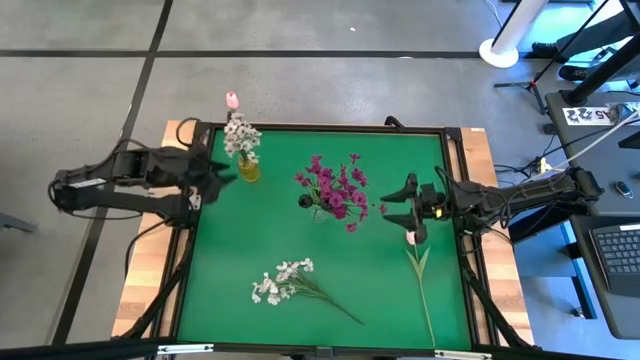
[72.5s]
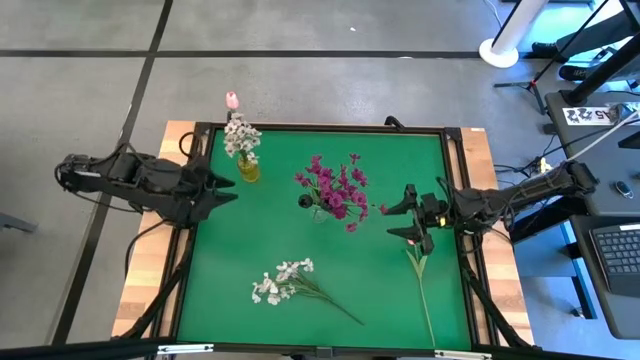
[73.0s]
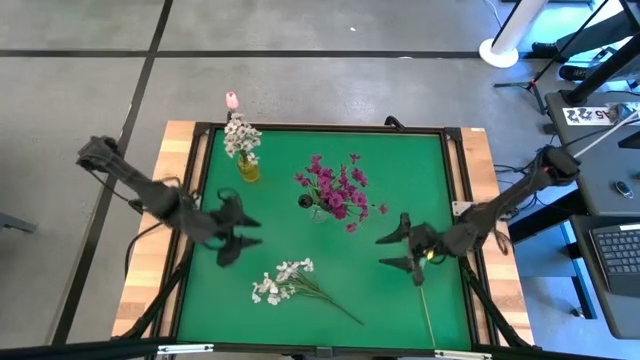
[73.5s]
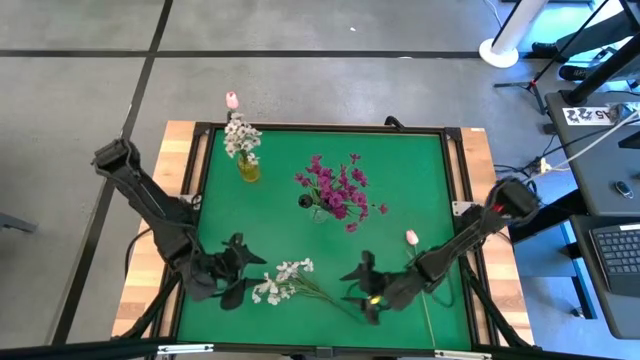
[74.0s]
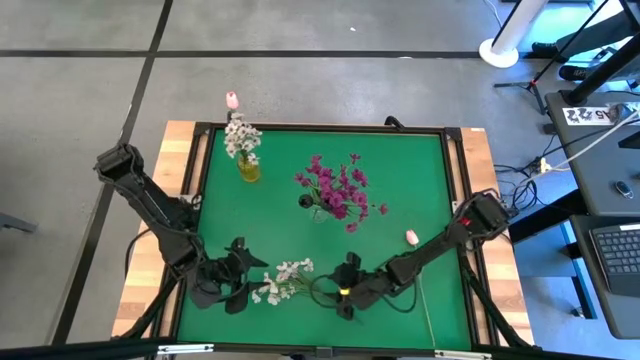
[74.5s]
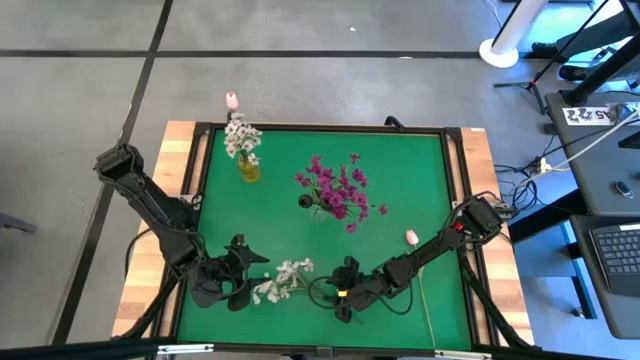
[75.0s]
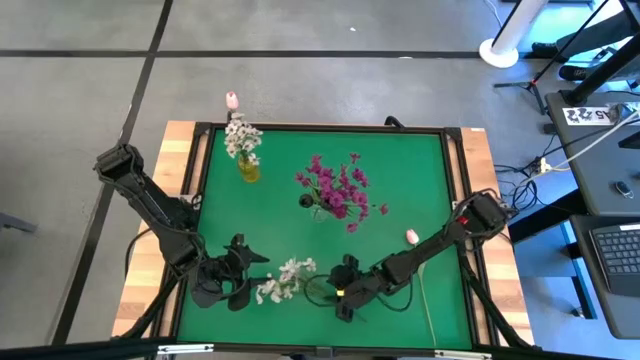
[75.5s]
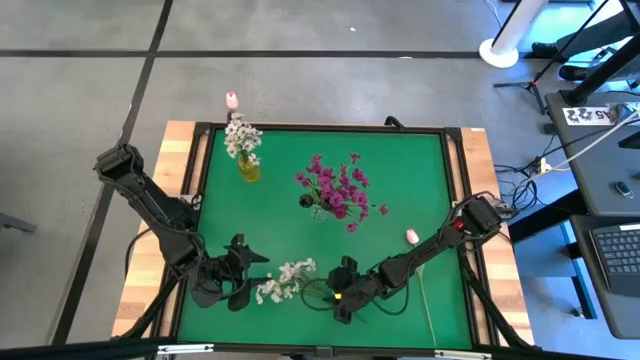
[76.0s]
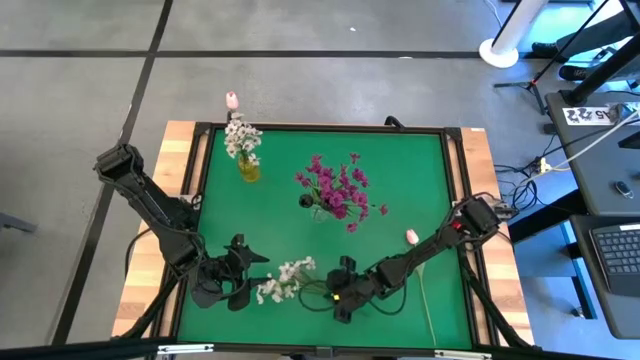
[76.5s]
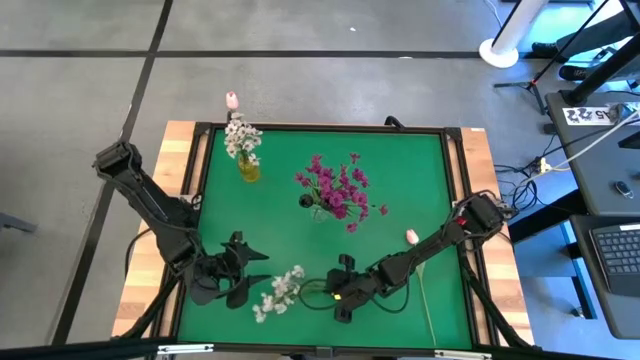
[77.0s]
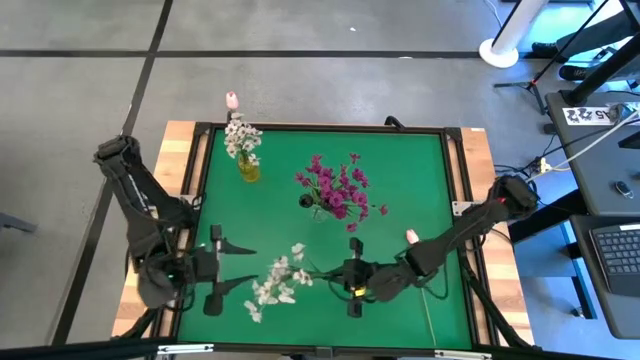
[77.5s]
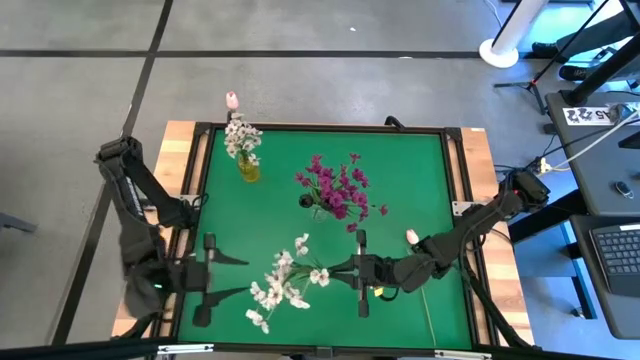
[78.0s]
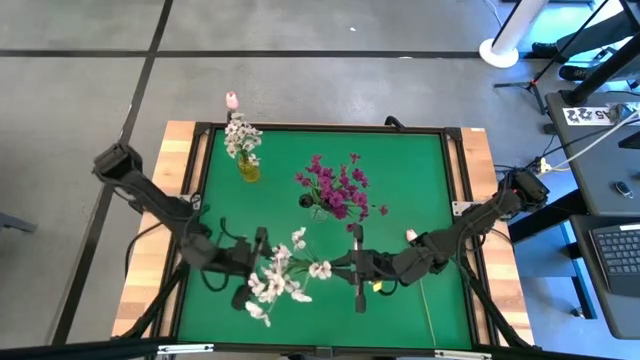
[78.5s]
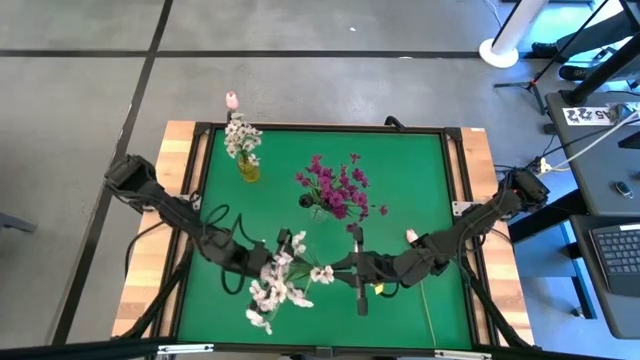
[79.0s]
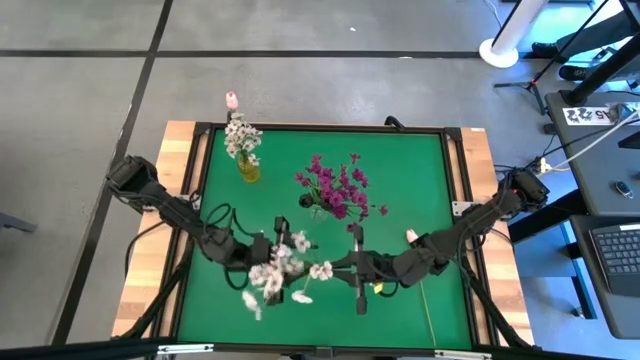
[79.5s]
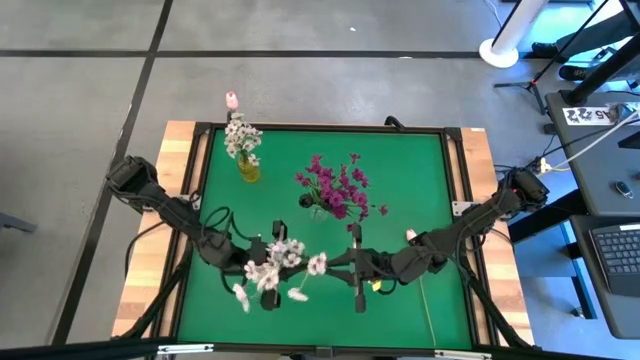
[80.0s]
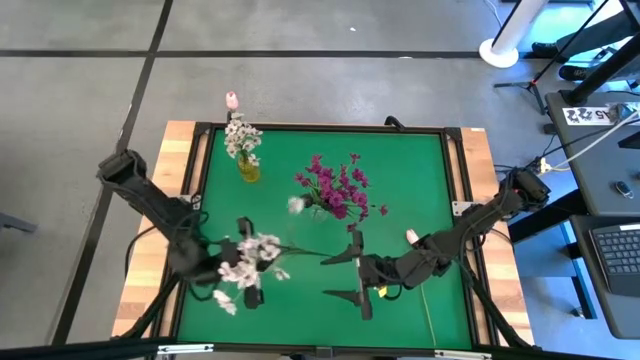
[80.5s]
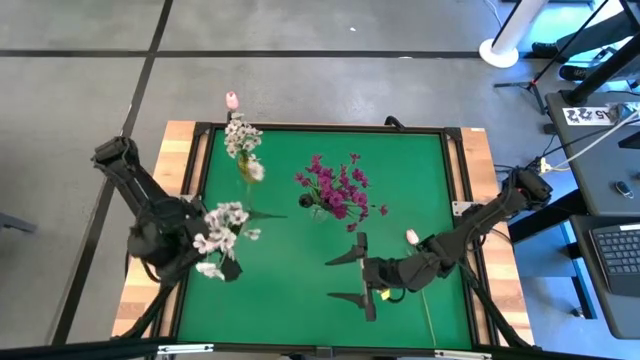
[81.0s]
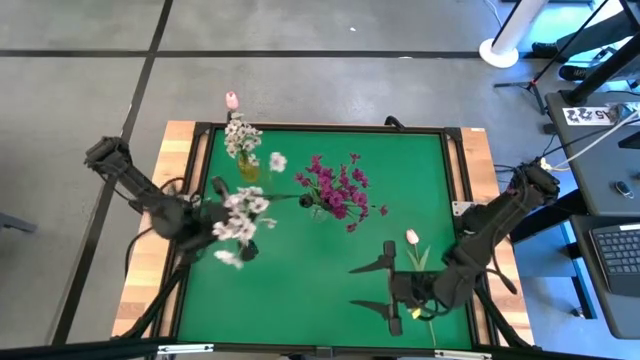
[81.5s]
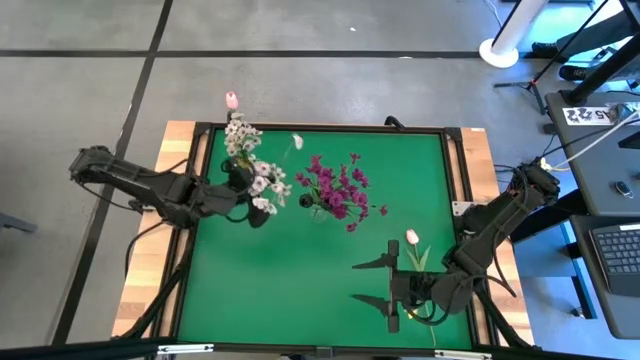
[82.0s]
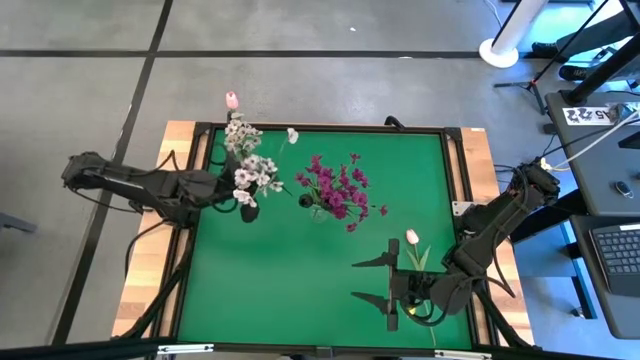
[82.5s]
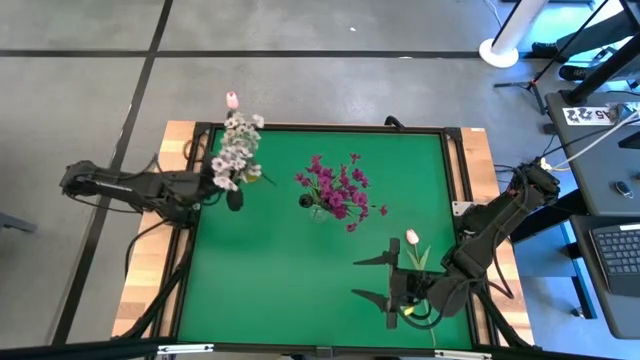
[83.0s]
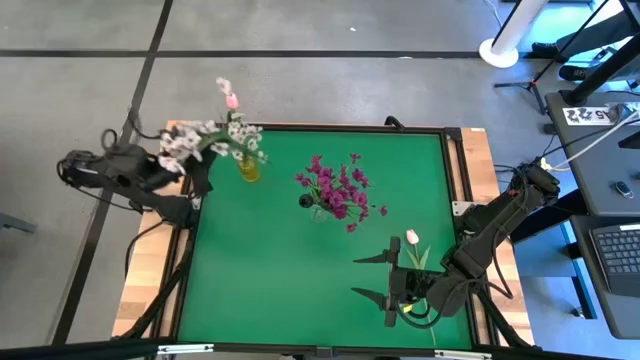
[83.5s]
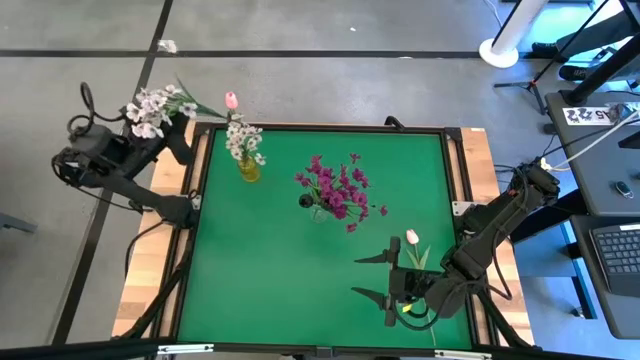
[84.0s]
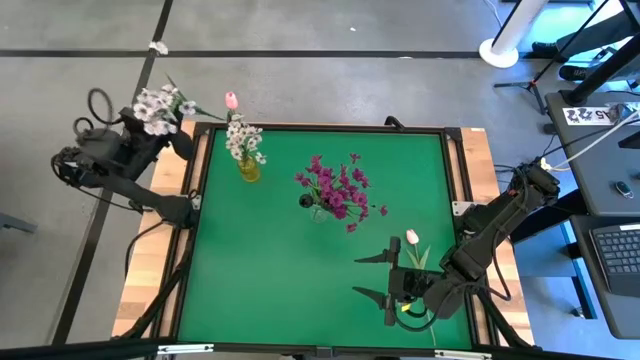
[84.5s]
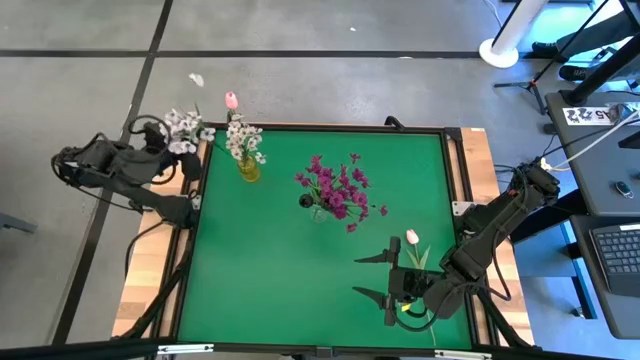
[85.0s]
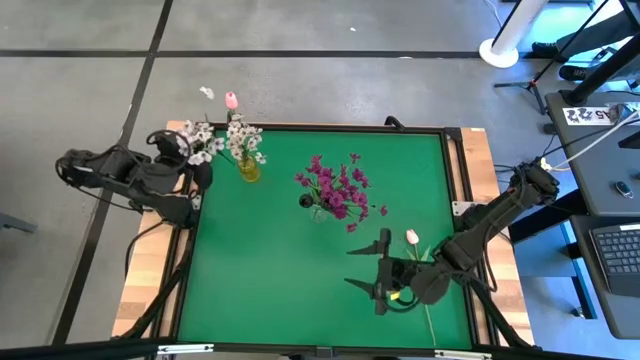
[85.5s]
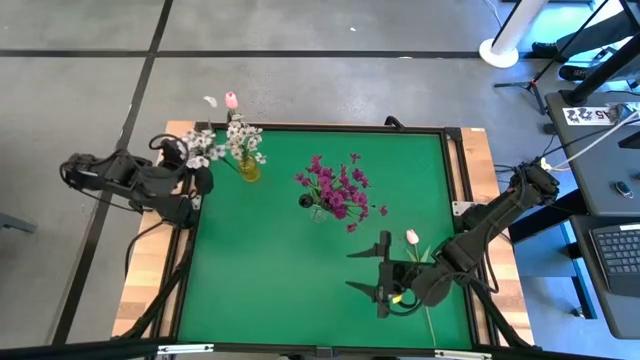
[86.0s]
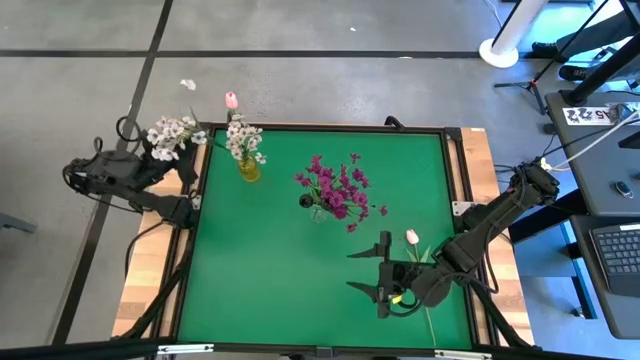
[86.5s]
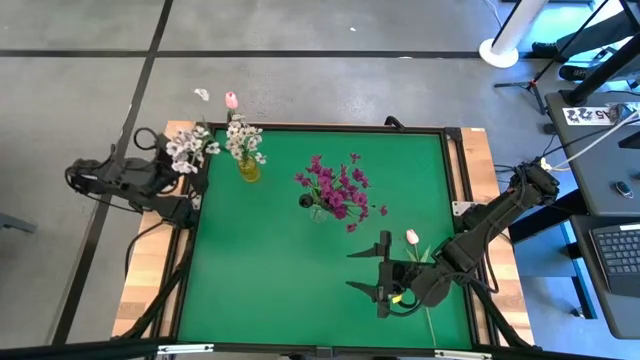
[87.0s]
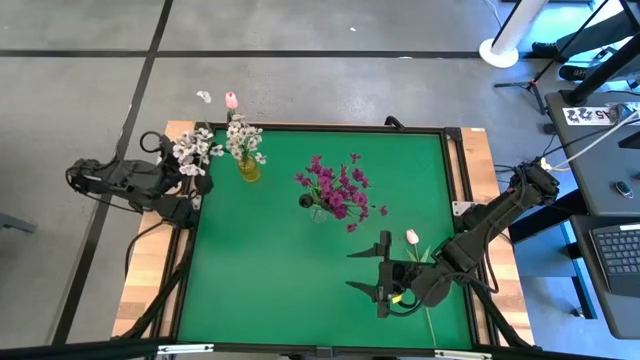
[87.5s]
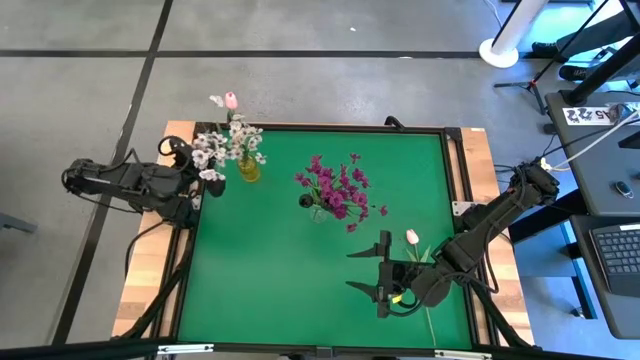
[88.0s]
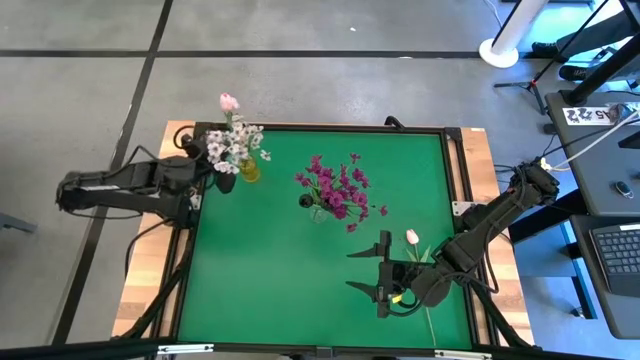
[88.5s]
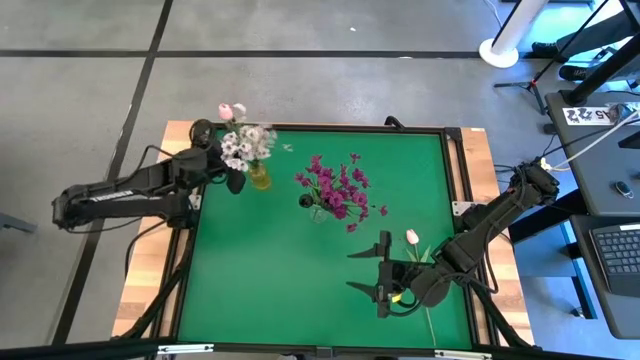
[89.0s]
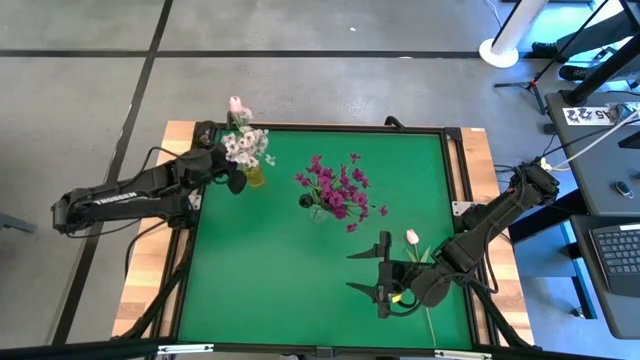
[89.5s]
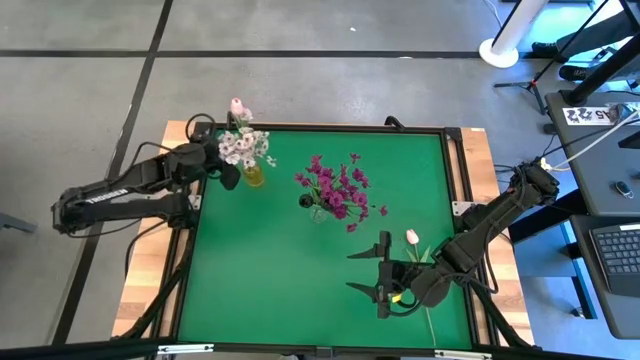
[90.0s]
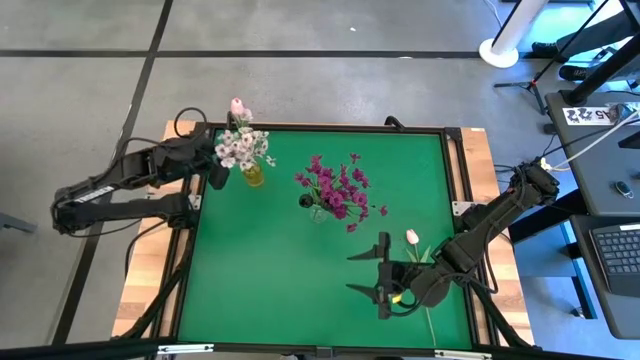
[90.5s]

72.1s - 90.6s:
Task: Sort flowers into vase by color
Put the white flowers into the yellow vase

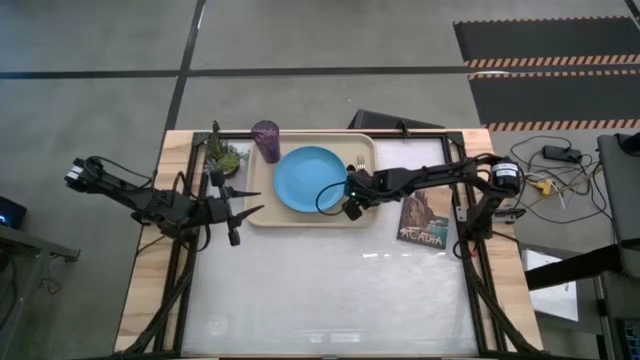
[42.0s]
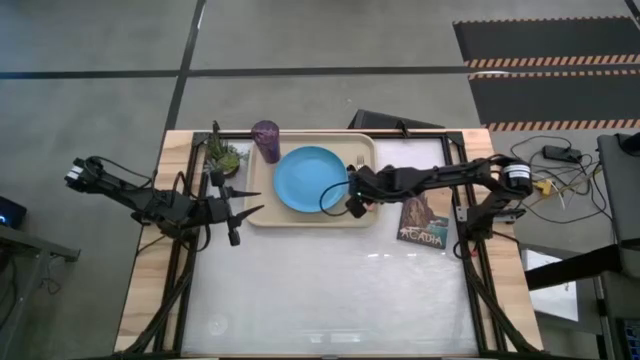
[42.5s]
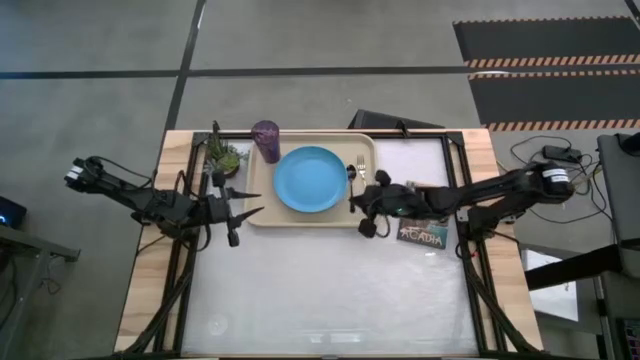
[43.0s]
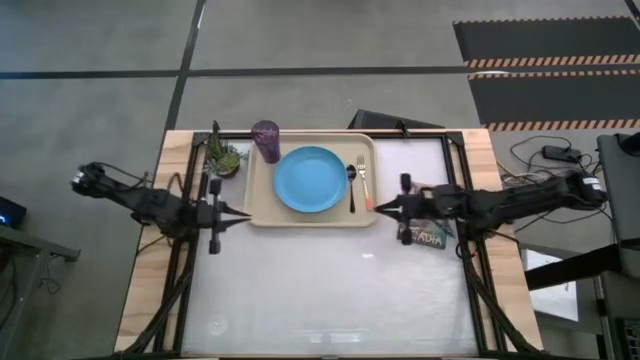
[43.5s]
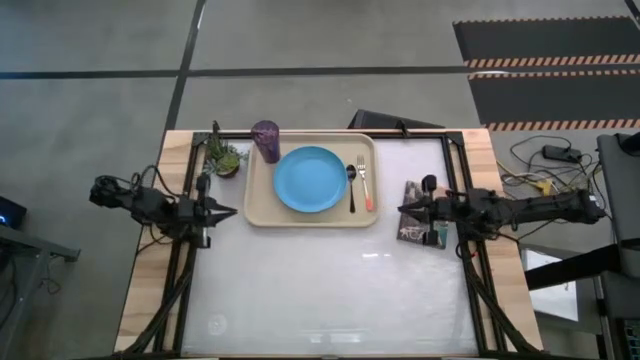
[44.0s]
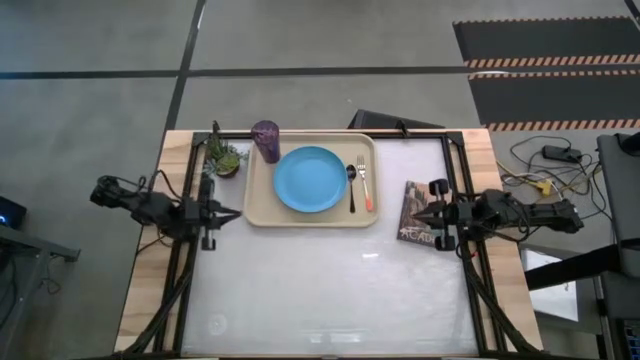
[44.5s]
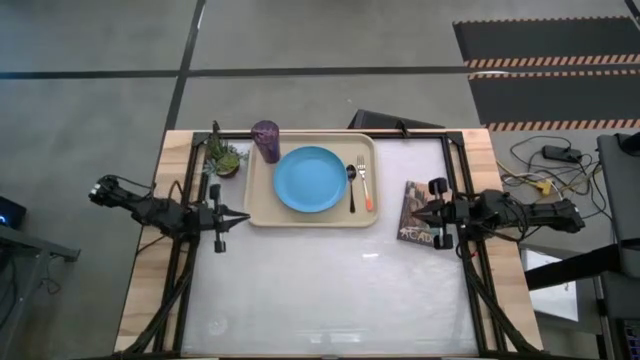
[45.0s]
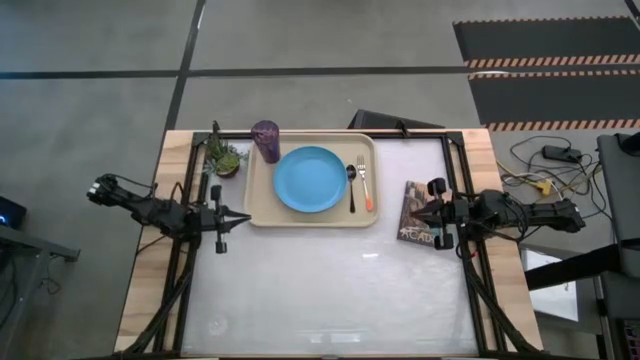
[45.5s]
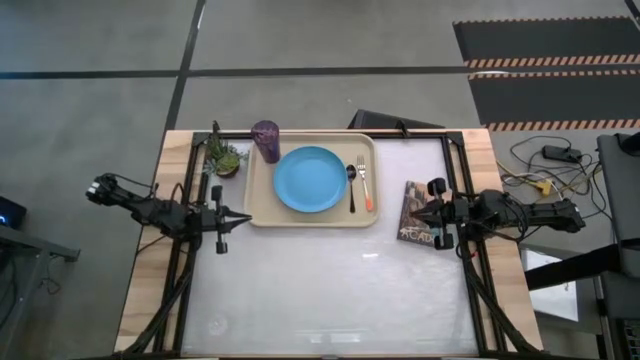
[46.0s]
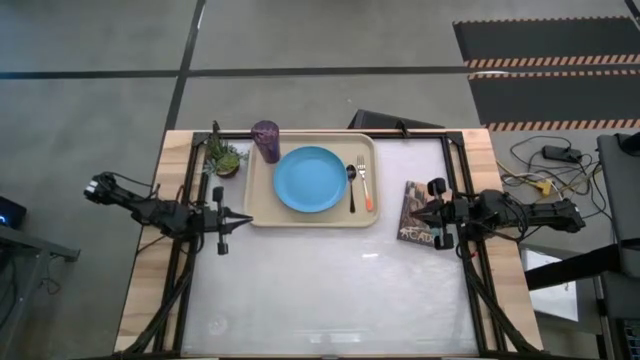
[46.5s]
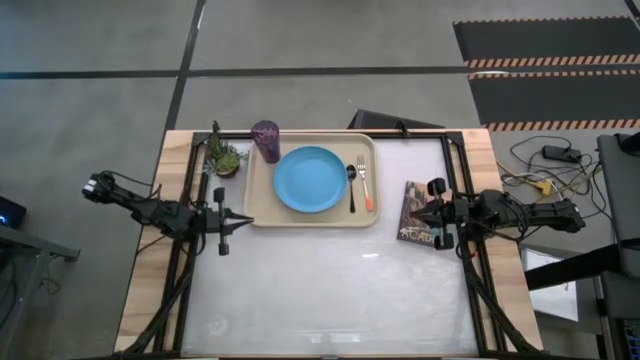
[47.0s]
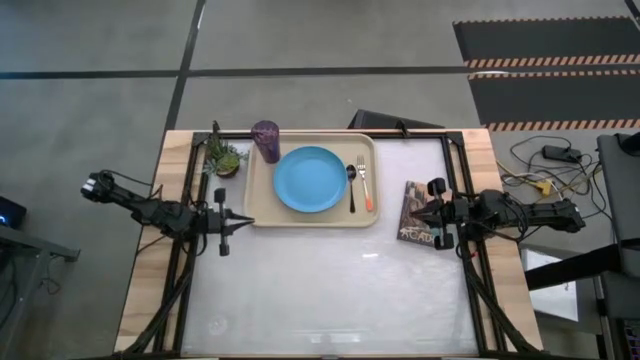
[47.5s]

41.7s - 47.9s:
Task: Pick and place plate/cup/fork/spoon on tray
Return to Home Position
